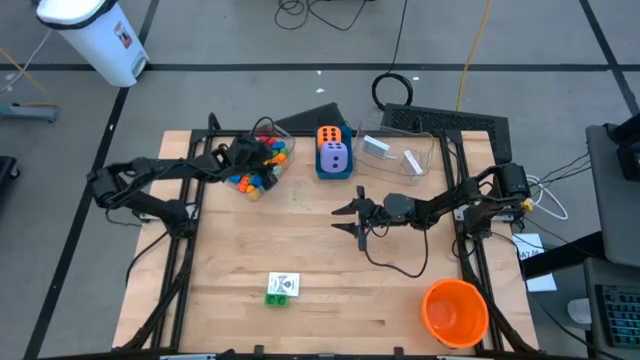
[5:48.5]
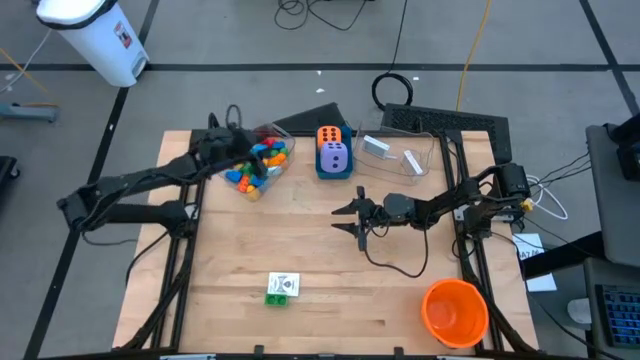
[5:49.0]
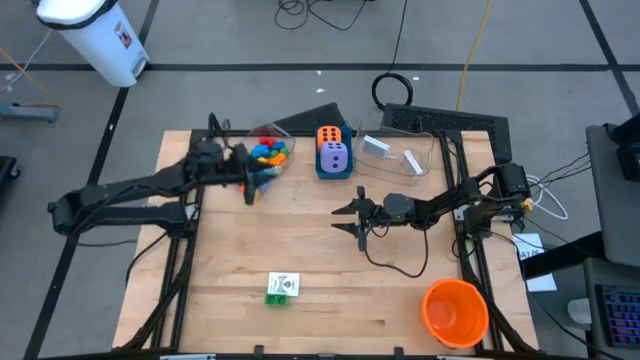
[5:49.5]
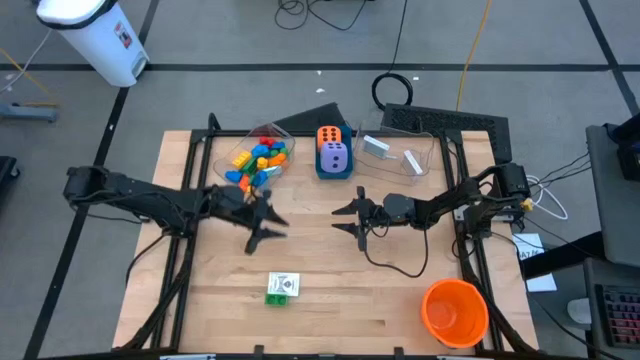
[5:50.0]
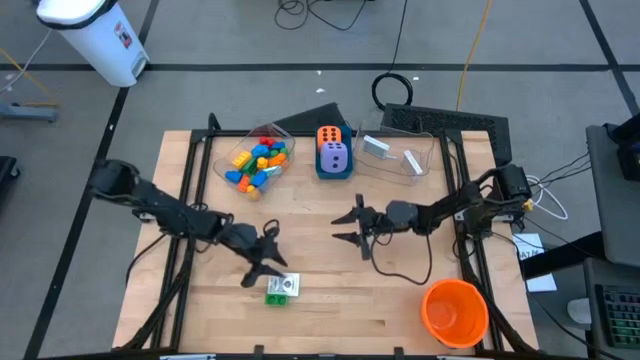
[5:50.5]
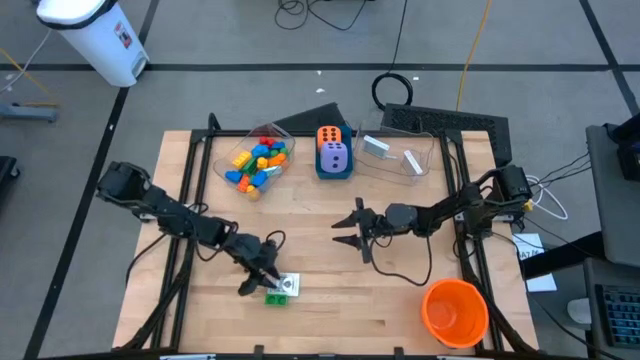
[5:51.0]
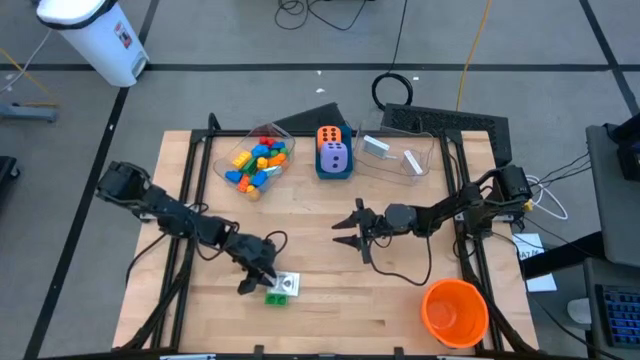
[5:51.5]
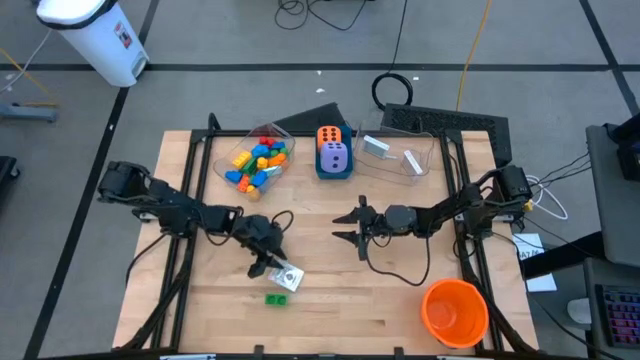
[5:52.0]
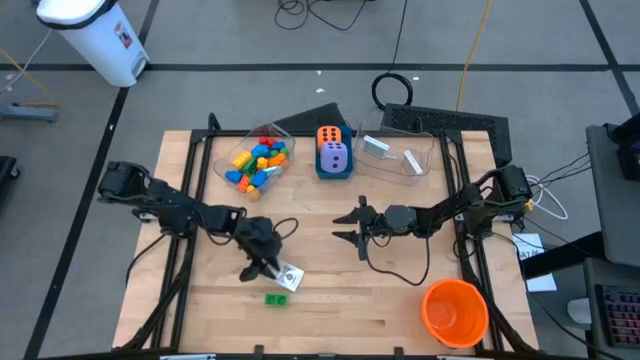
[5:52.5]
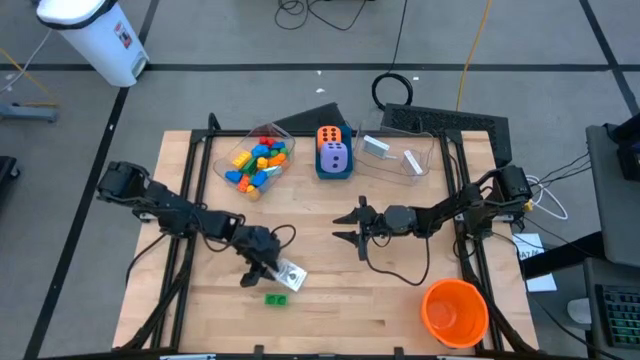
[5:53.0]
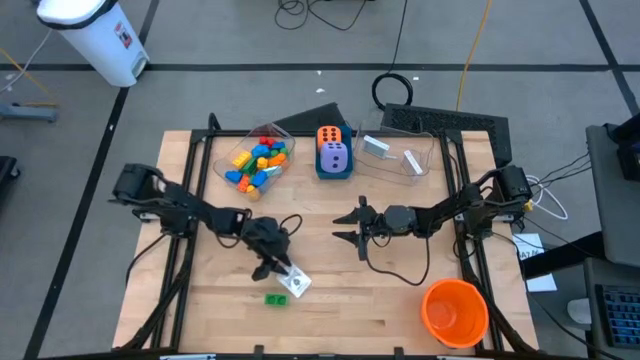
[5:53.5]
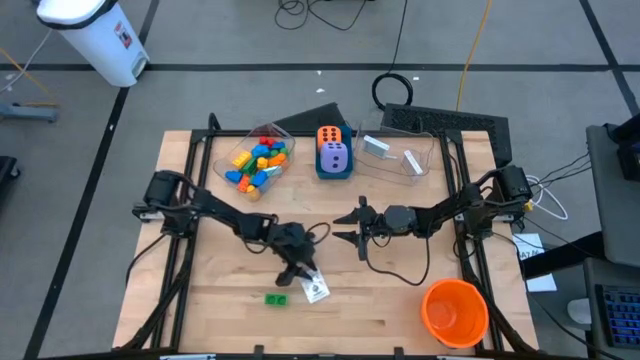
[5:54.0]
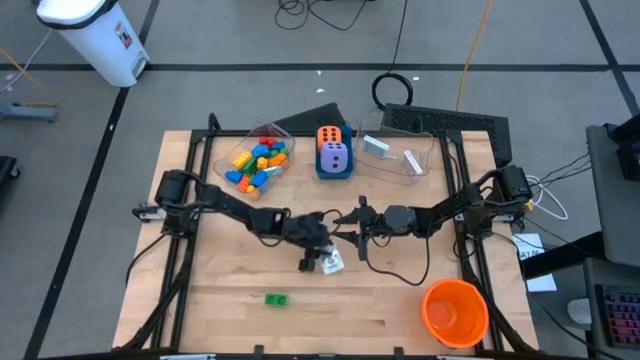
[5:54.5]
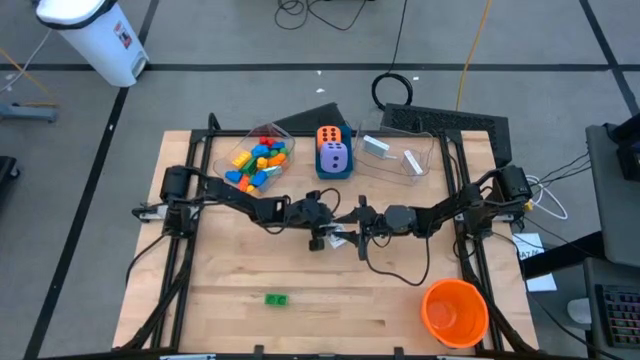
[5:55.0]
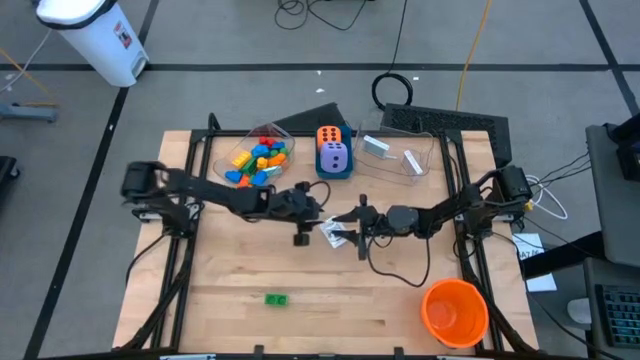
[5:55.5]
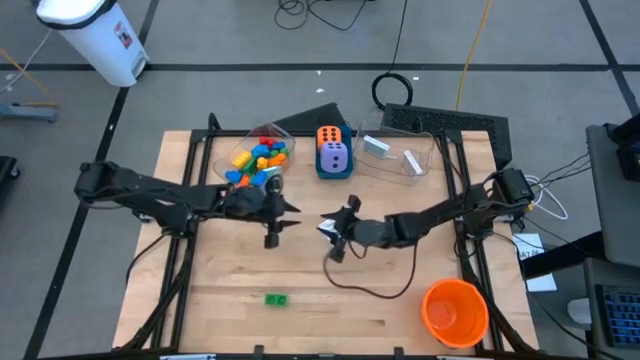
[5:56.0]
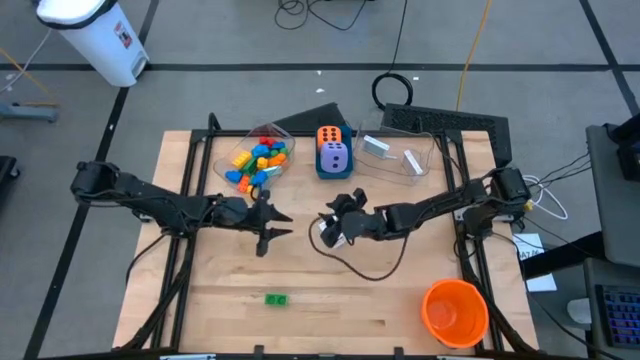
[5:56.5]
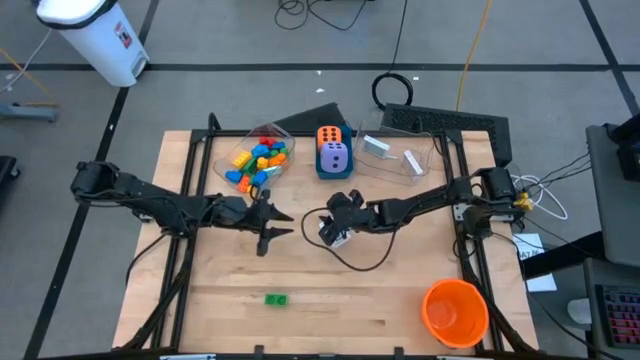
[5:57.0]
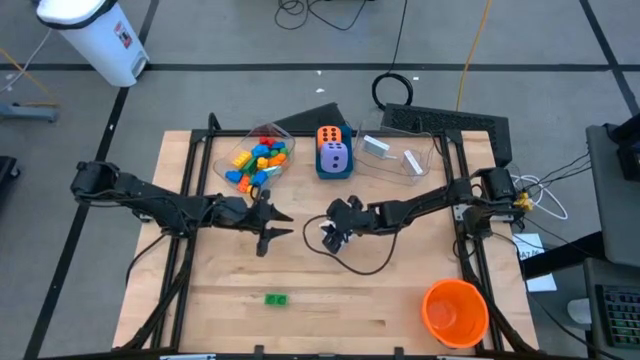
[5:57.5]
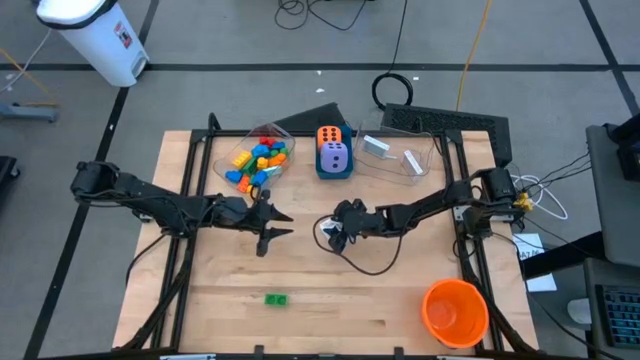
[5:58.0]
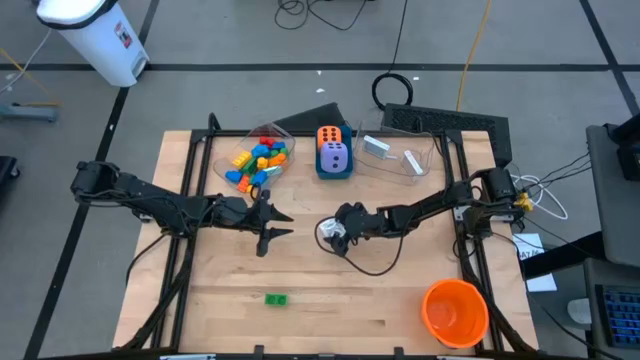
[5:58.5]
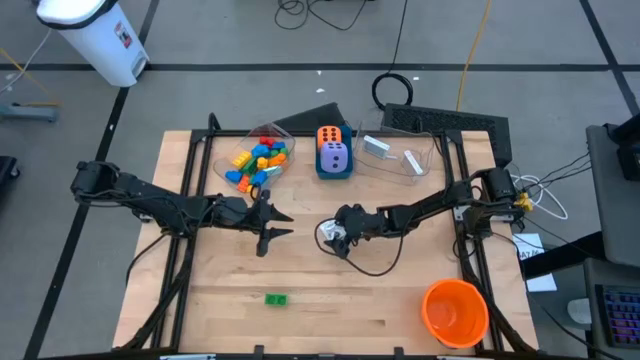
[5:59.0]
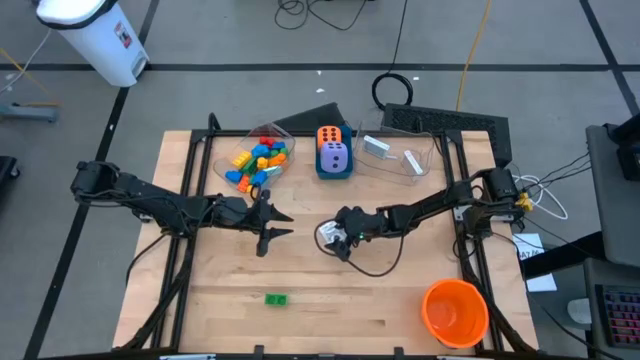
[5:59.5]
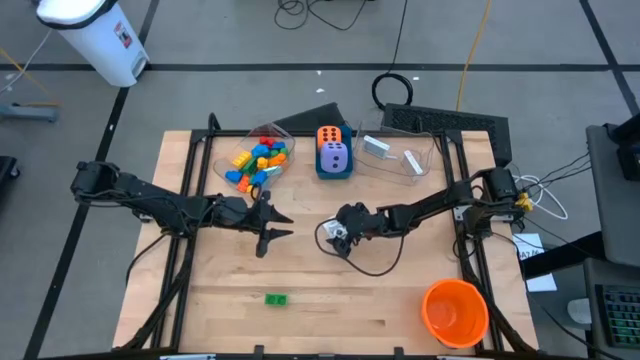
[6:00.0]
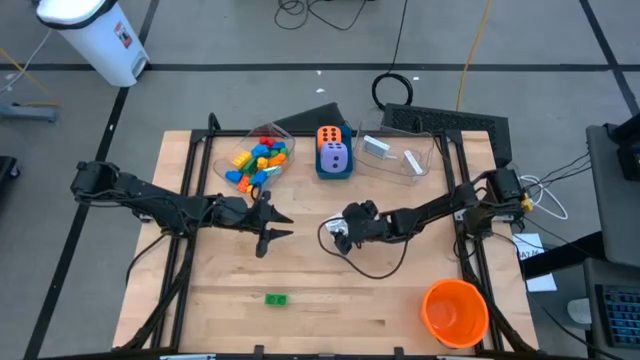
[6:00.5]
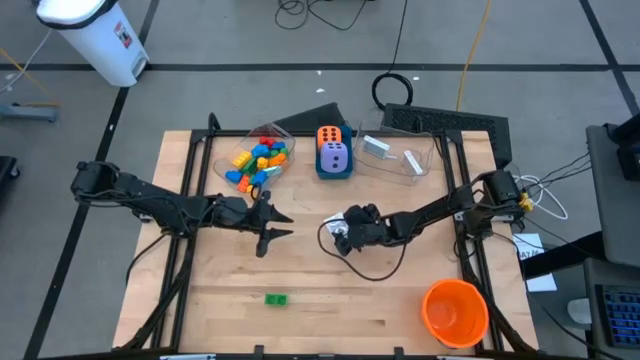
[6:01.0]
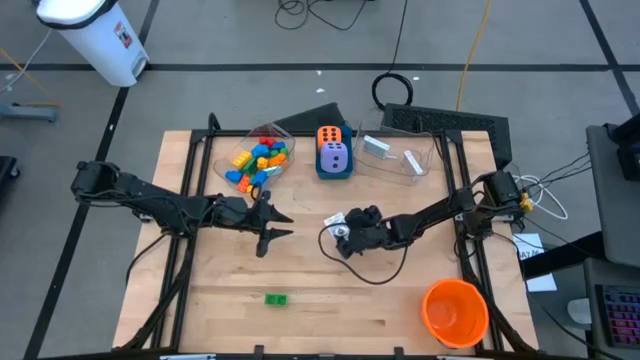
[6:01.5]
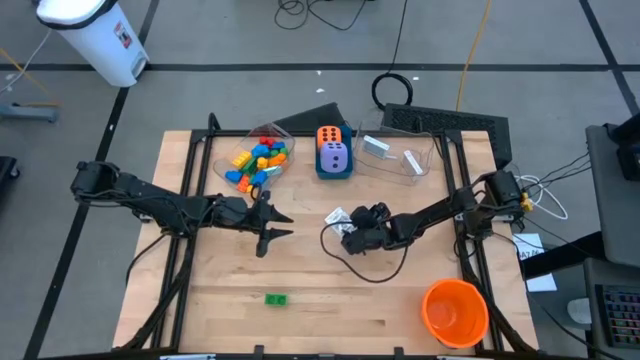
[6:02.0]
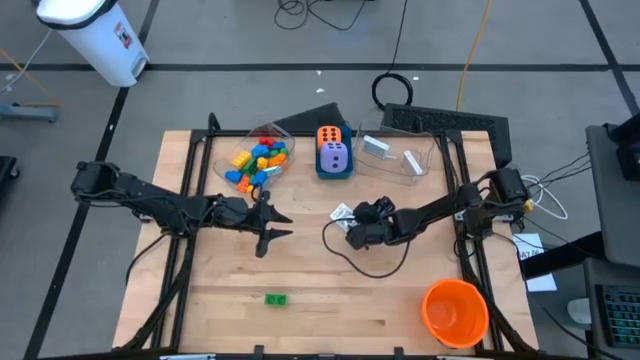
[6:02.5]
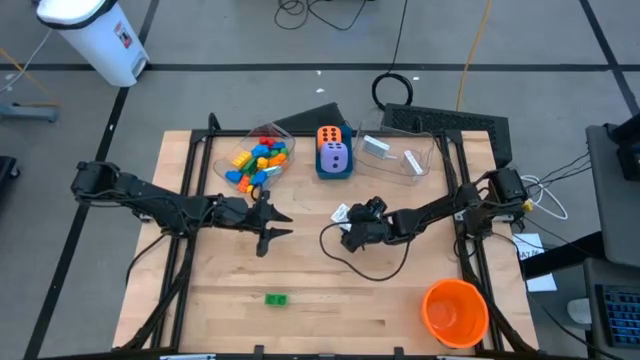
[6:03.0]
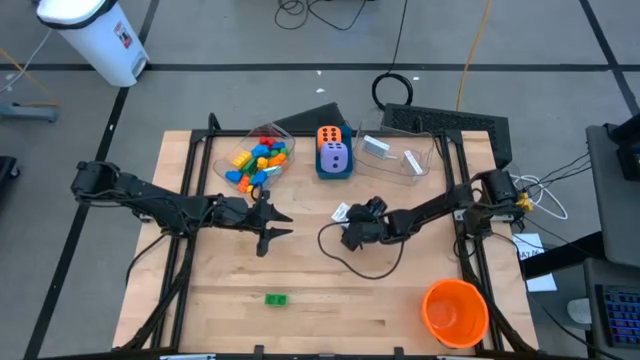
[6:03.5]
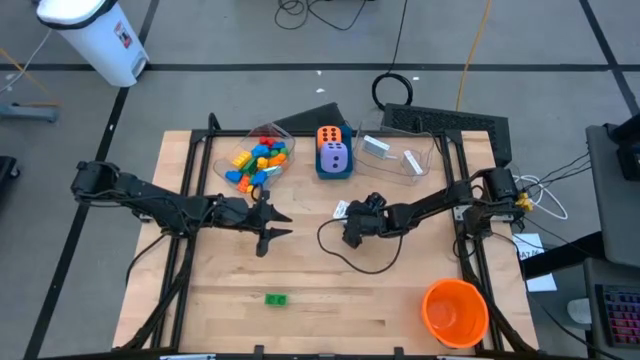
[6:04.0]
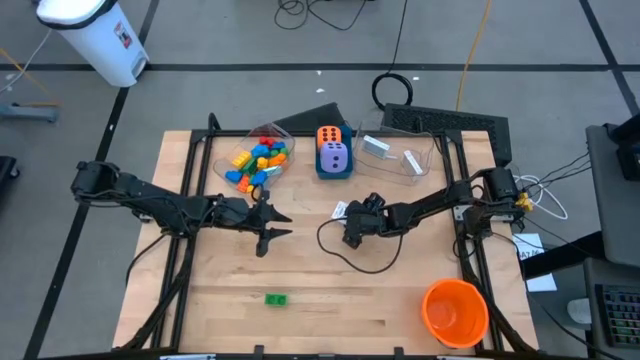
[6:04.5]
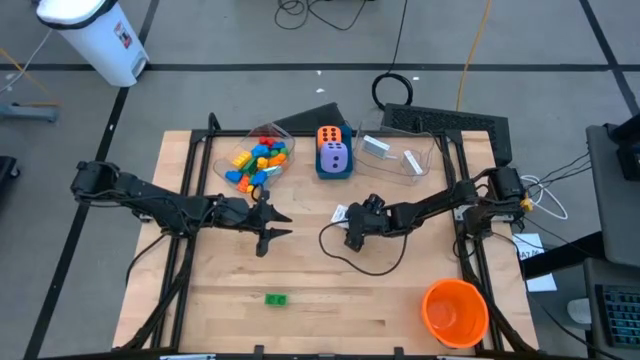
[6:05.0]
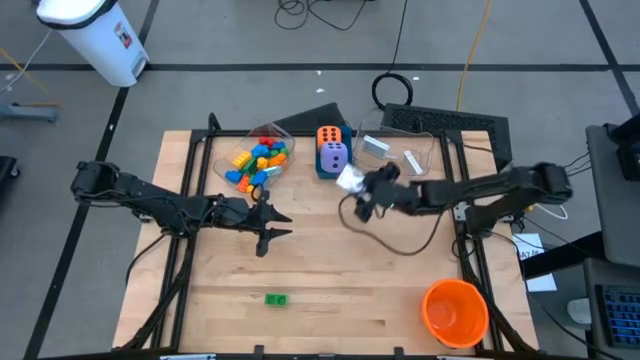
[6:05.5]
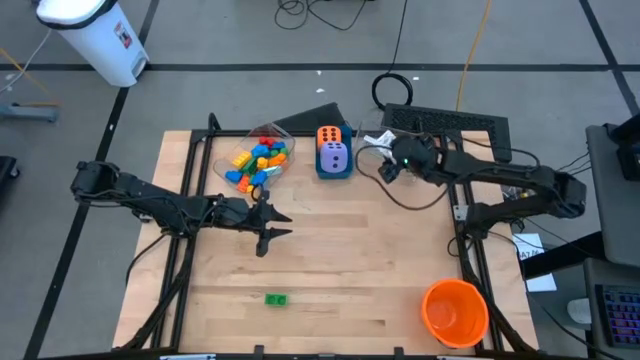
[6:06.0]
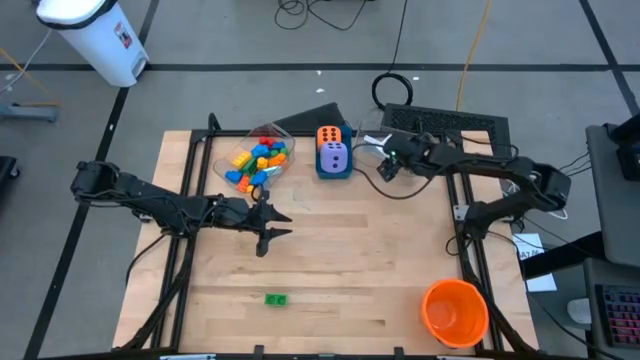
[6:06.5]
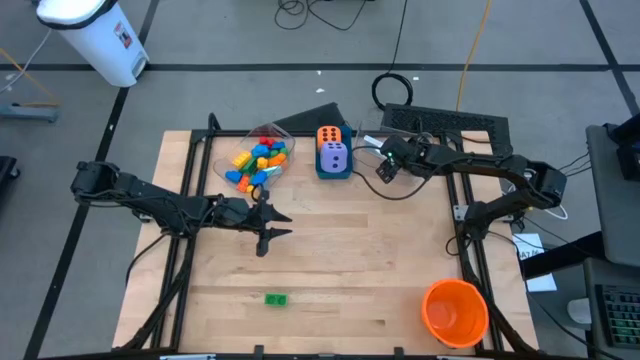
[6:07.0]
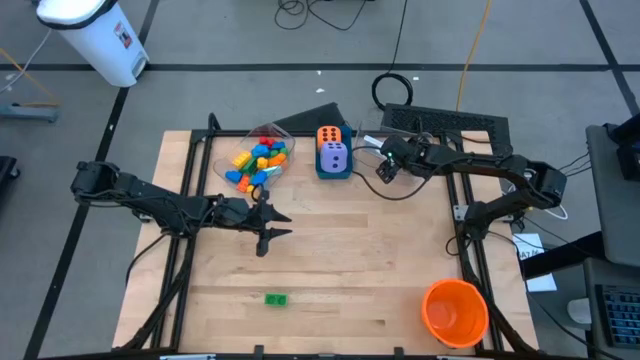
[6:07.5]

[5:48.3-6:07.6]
Task: Pick & Place Toys
Put the black playing cards into the right transparent bin

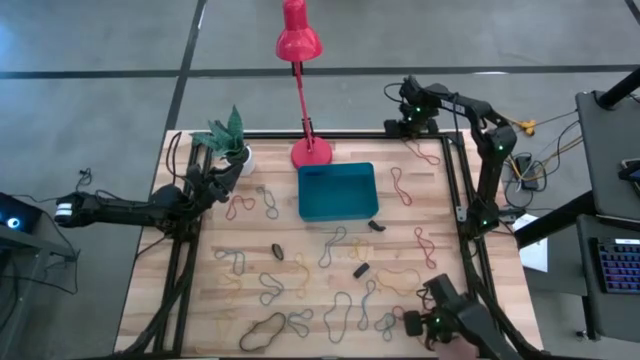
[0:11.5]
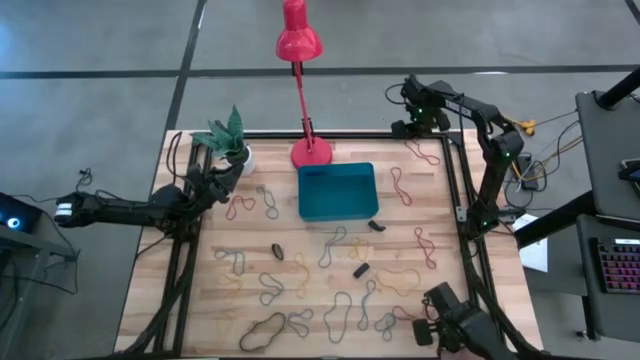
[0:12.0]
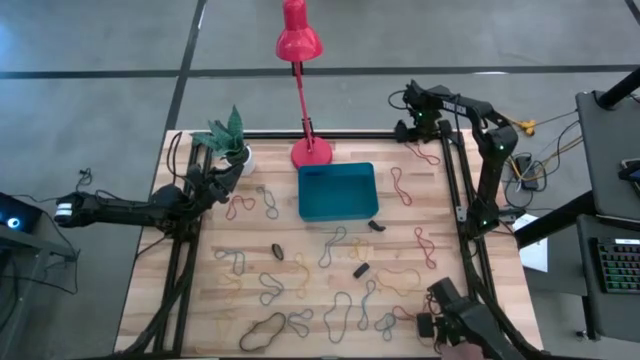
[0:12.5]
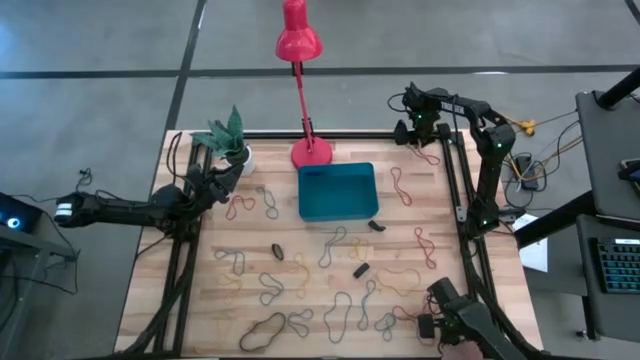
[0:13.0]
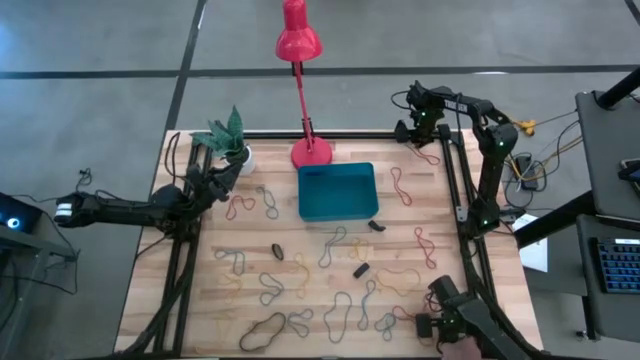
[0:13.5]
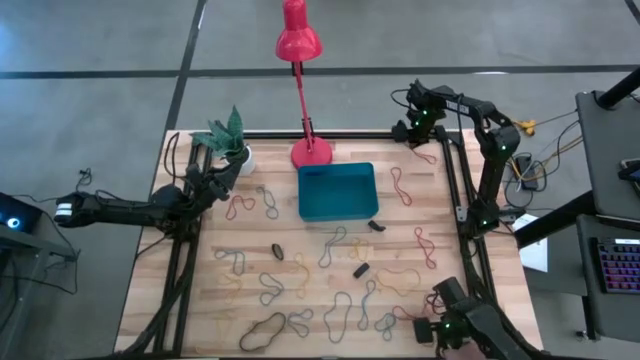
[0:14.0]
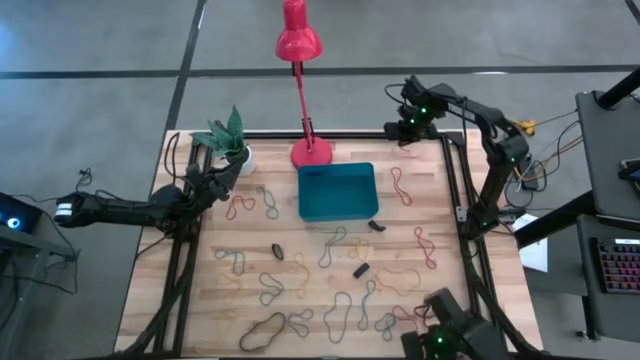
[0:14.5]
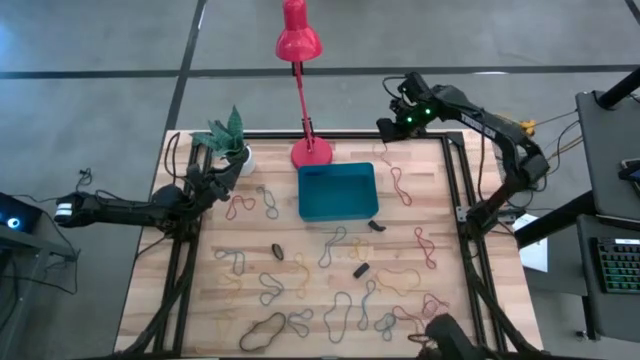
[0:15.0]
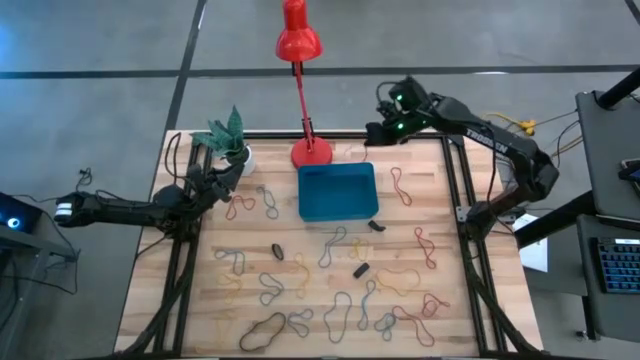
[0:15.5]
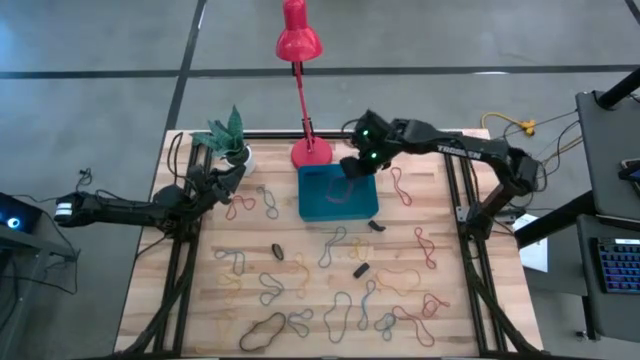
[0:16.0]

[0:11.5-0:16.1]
Task: Pick and place rubber bands into bin
Put the red rubber band into the blue bin
